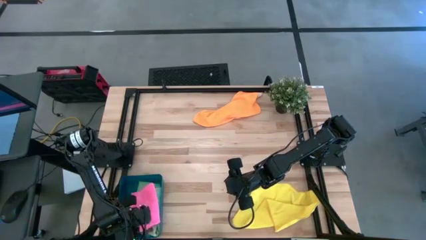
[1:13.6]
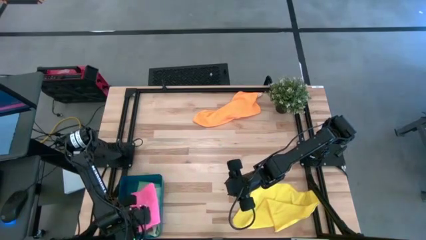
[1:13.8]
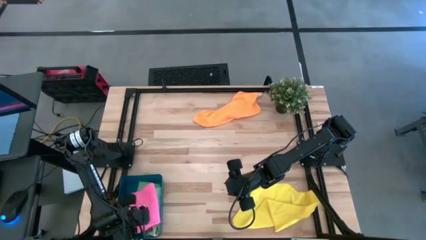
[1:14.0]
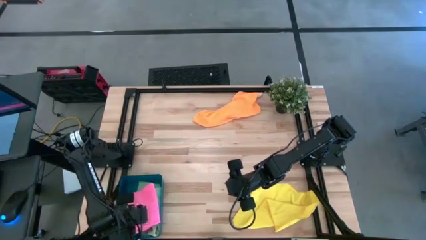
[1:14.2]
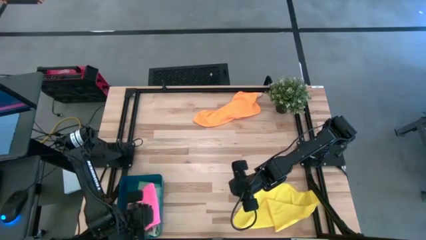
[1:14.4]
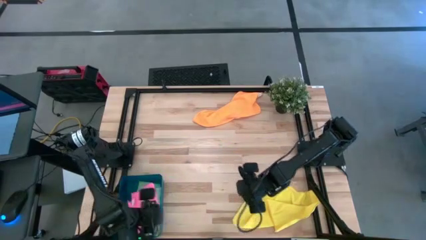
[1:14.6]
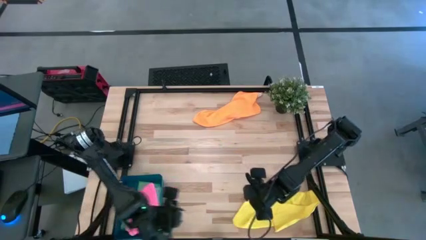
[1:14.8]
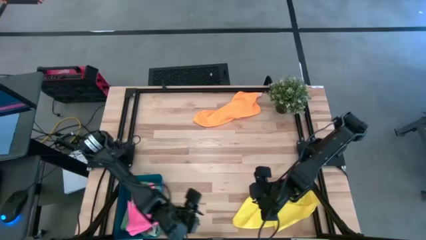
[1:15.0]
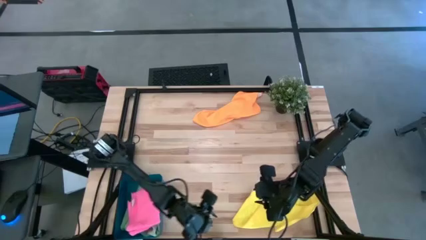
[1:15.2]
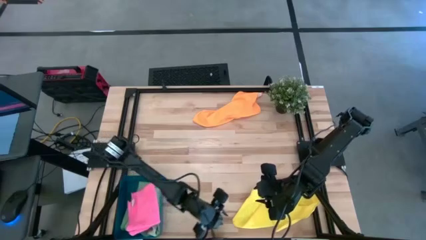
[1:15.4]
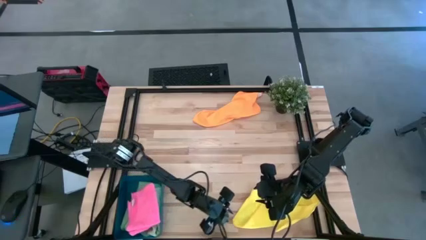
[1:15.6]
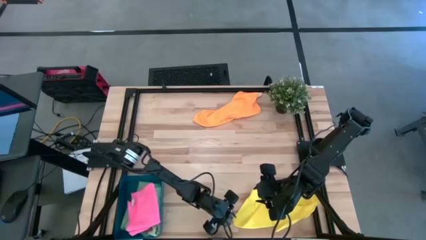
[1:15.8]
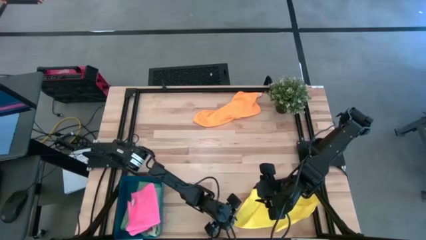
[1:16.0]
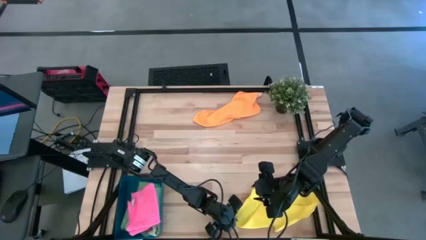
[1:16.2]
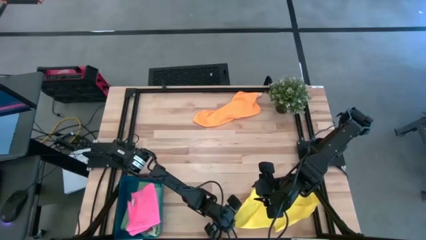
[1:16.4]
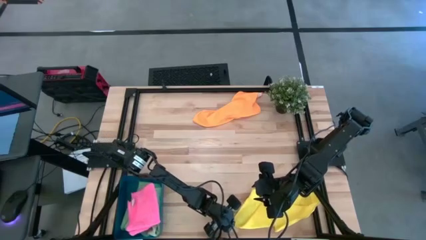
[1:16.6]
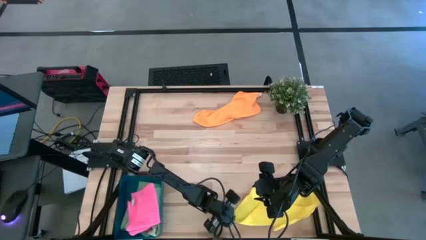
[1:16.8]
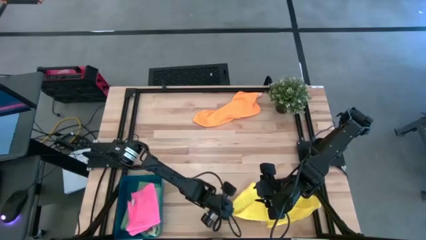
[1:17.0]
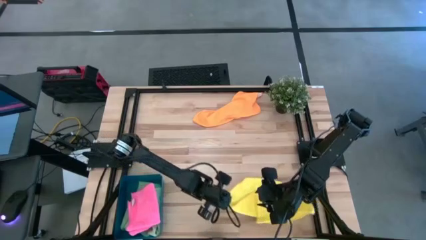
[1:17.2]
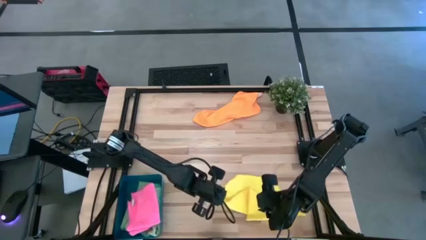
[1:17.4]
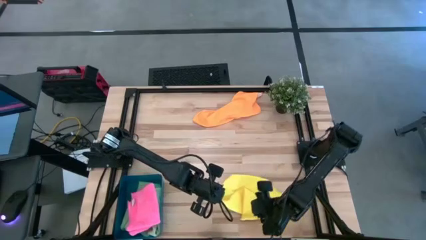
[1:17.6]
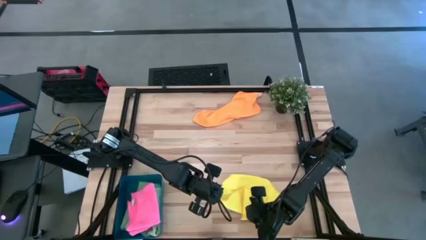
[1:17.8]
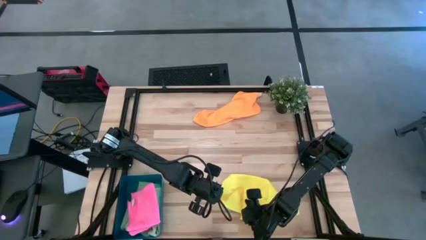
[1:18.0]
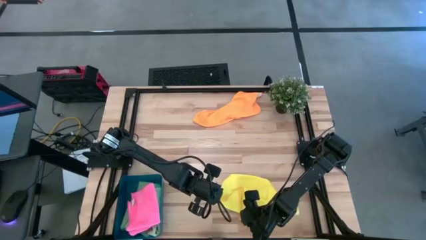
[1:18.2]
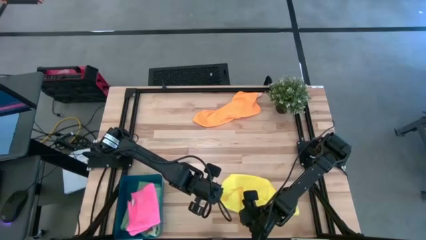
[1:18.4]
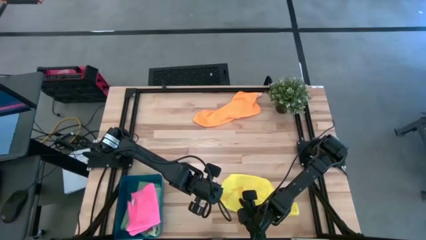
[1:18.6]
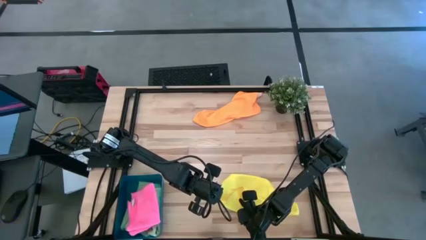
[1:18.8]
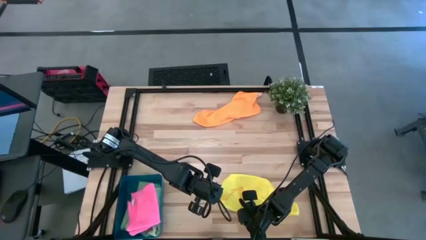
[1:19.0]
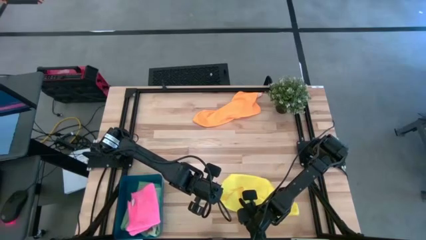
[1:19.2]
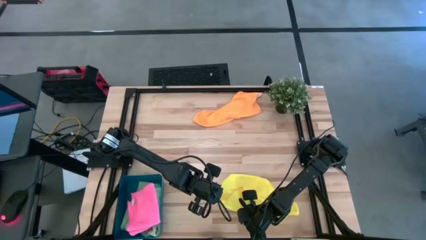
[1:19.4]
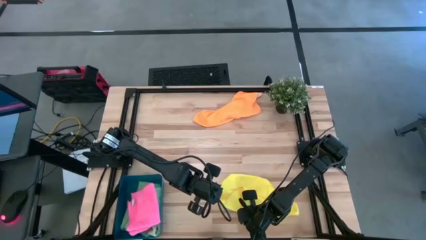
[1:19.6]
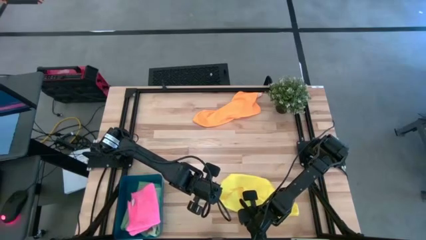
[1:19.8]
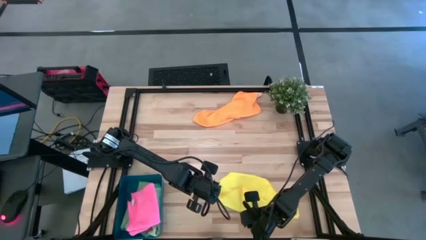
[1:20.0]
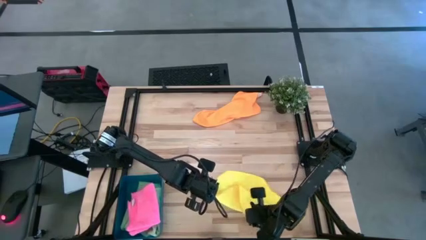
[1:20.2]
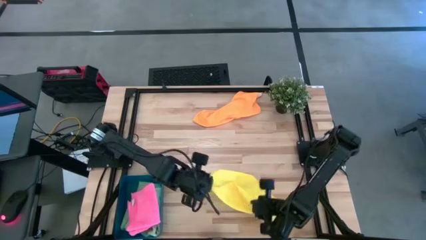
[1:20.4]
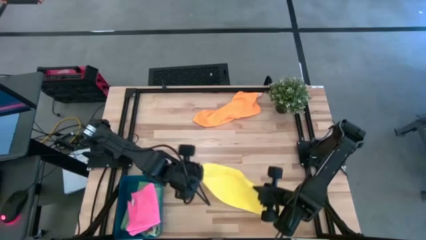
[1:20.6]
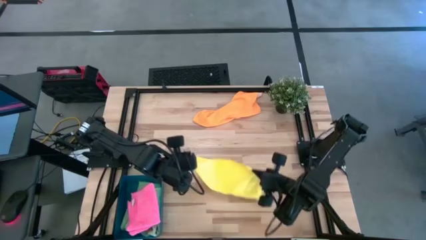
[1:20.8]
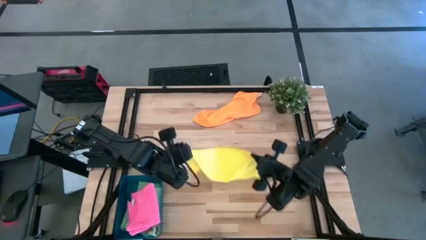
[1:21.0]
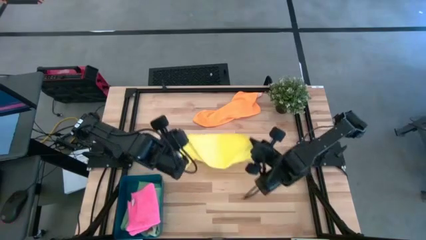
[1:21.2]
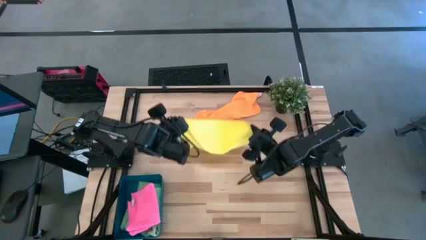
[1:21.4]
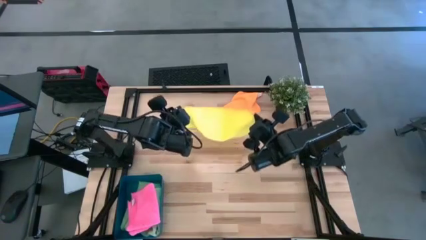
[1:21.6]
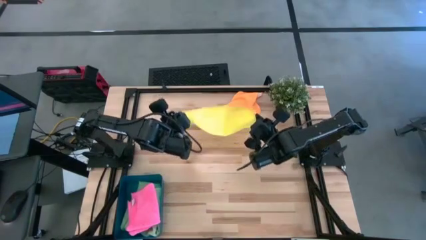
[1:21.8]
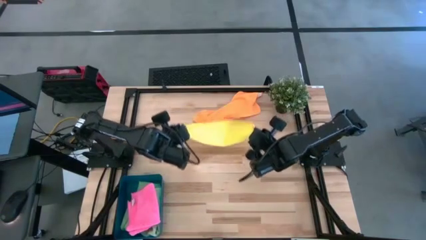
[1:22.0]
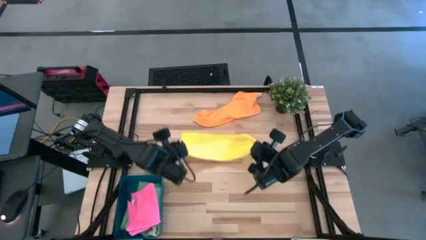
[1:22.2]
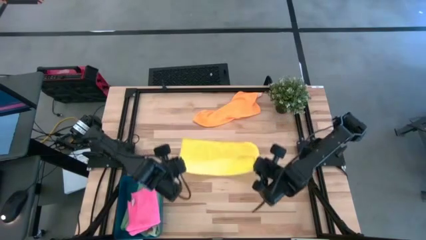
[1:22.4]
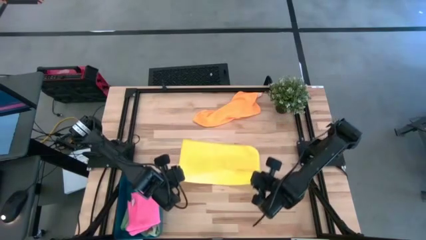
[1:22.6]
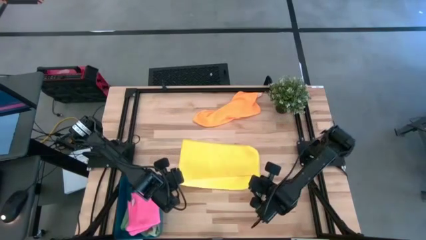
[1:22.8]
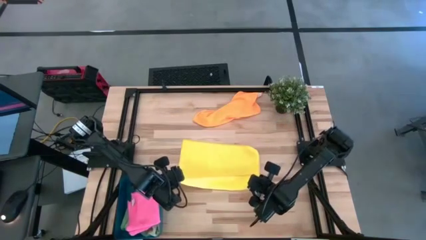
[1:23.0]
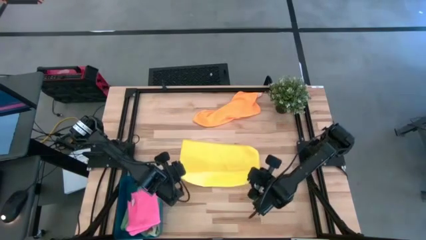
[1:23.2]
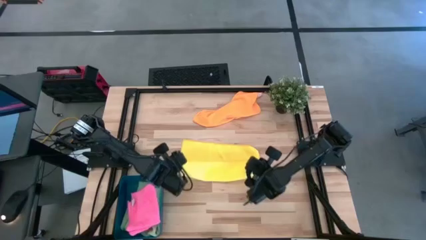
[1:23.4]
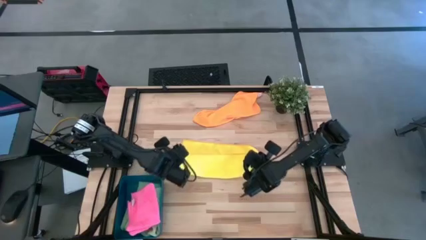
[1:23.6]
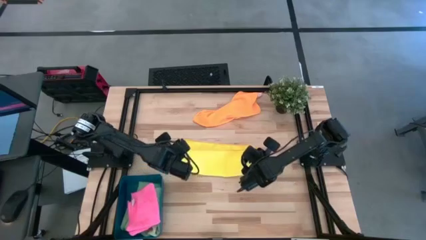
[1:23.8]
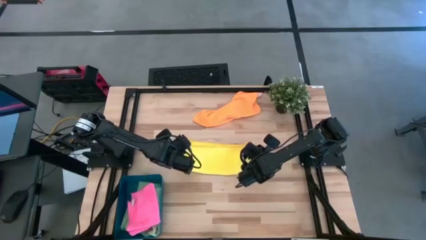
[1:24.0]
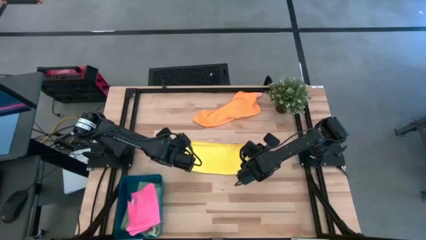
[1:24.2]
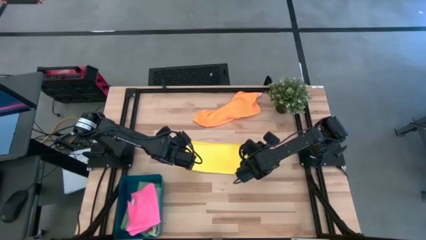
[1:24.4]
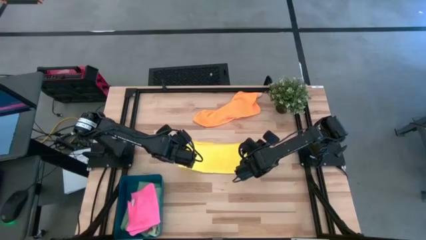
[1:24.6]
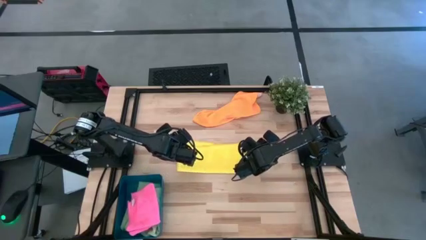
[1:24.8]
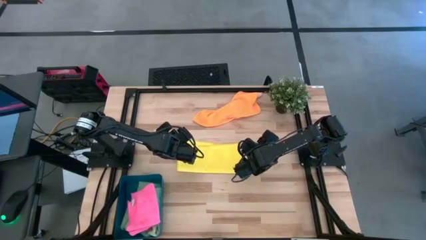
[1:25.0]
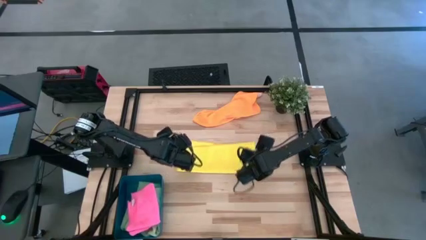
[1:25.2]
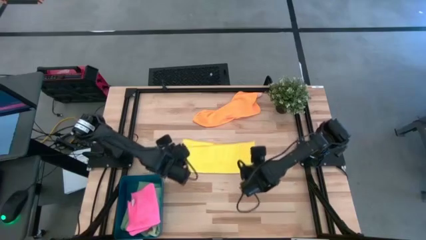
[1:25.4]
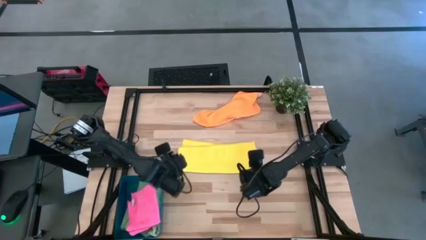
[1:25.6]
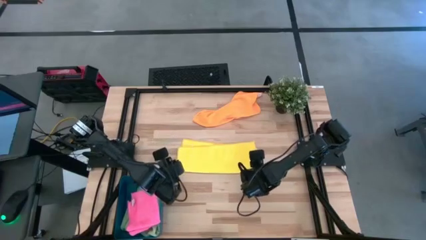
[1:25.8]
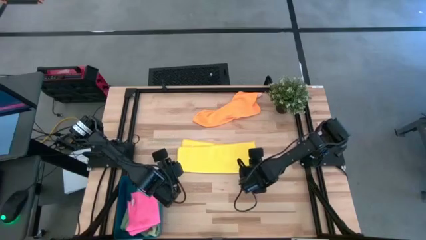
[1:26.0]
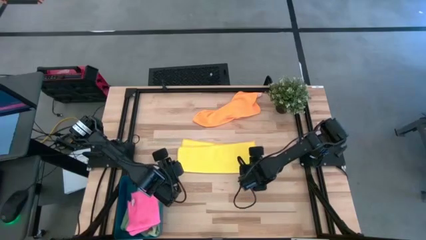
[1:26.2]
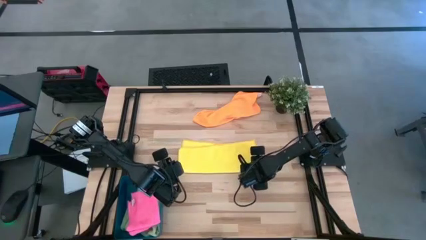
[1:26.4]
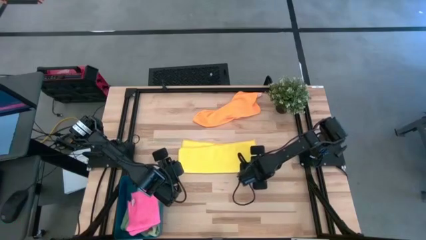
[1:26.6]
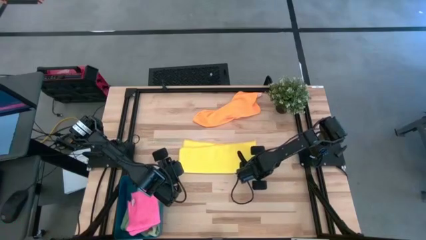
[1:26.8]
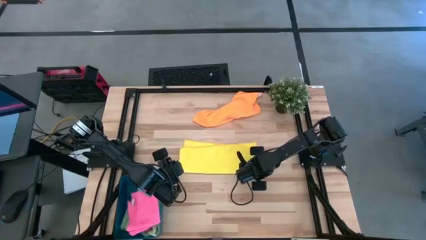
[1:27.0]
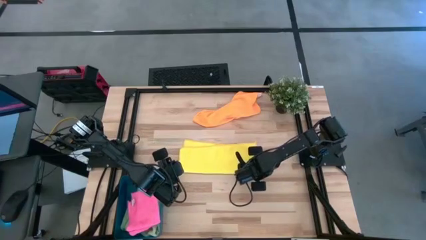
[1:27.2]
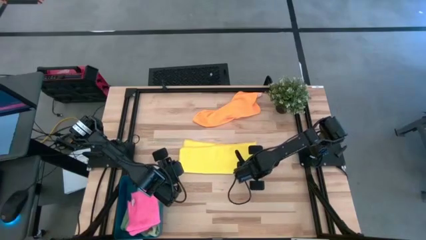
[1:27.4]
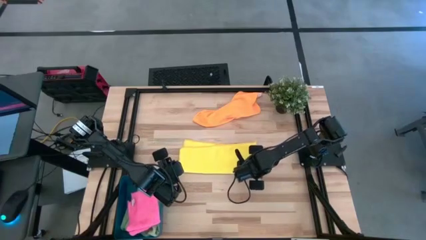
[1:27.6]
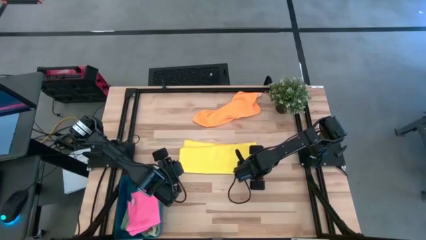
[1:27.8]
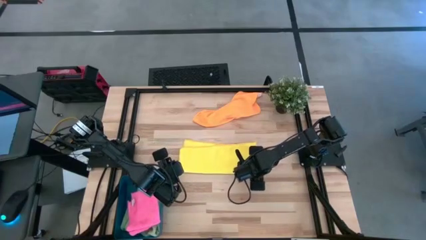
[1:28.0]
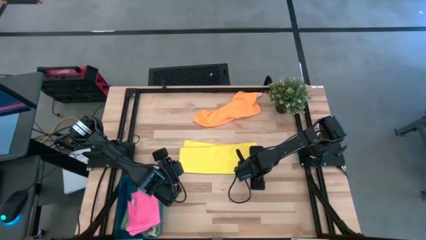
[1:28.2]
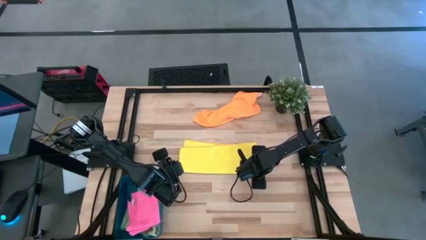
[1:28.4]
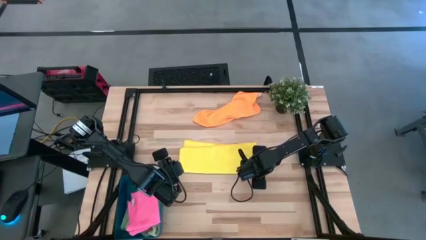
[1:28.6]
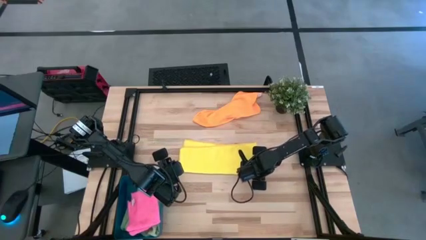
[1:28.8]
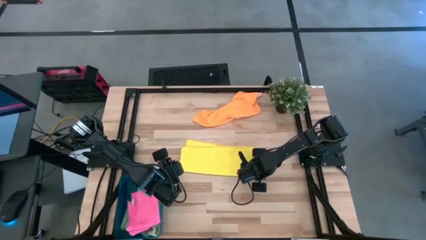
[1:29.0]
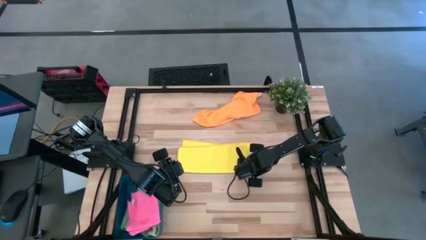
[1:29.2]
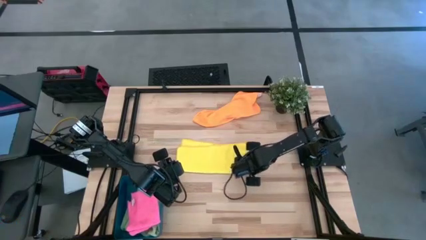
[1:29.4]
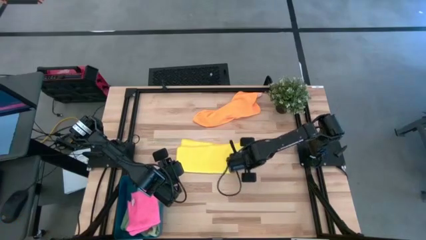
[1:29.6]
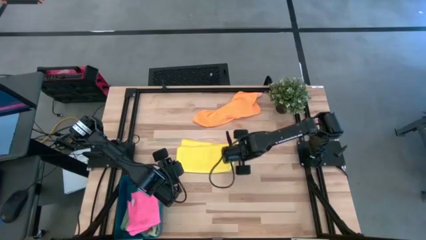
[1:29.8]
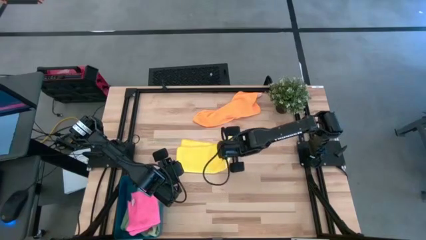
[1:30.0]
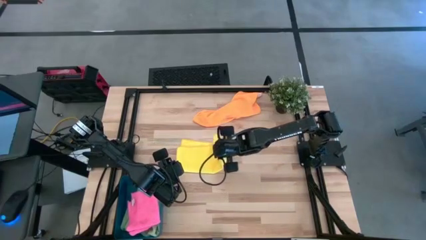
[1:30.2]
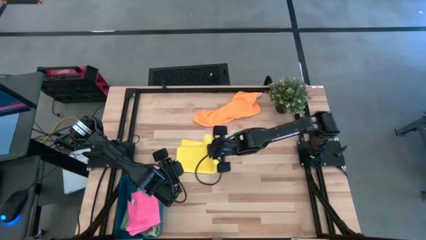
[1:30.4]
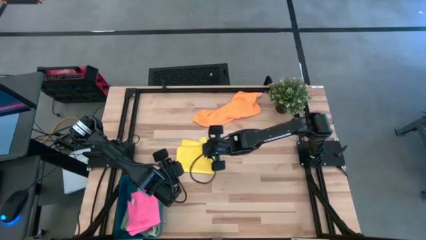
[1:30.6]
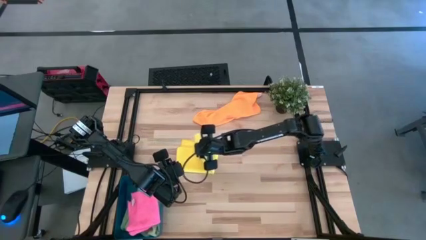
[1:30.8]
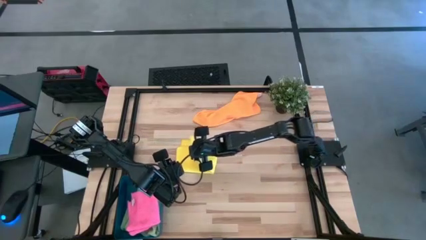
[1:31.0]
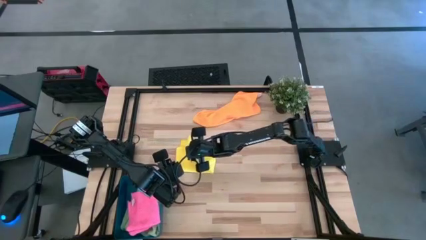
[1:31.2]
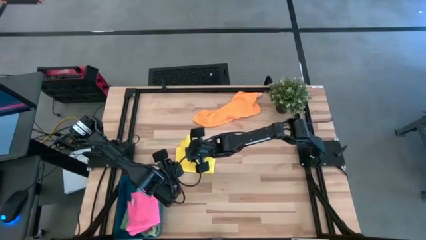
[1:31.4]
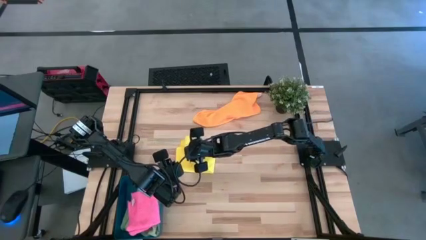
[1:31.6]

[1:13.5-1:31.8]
Task: Fold microfiber towels
Fold the yellow microfiber towel
